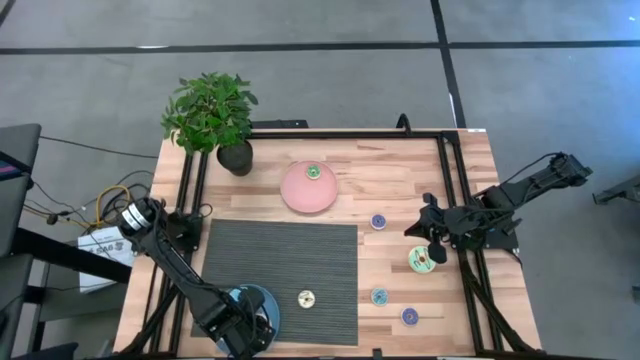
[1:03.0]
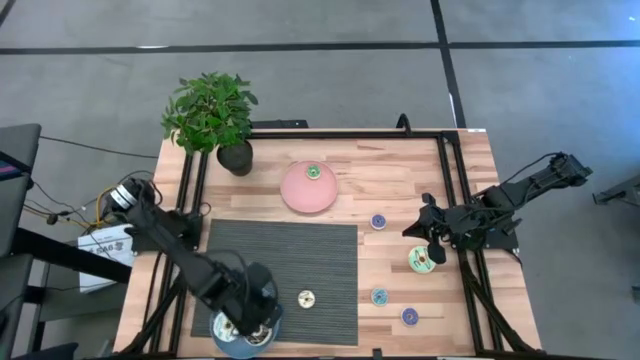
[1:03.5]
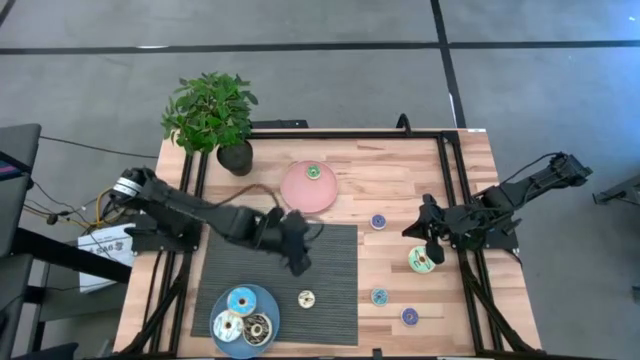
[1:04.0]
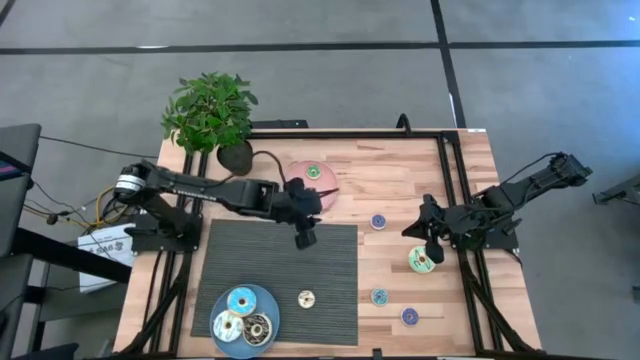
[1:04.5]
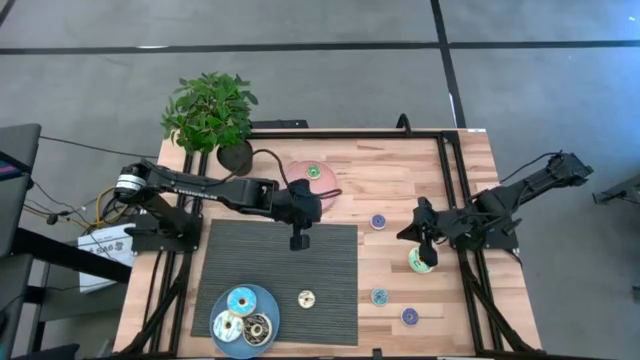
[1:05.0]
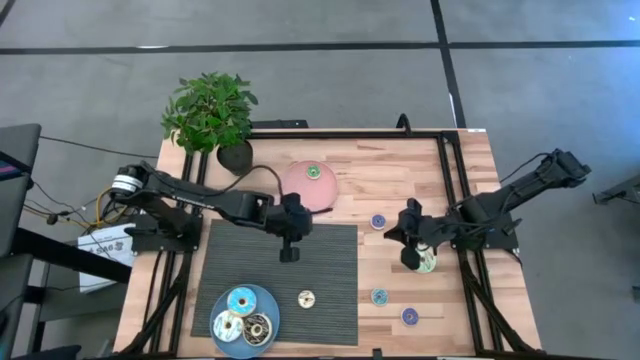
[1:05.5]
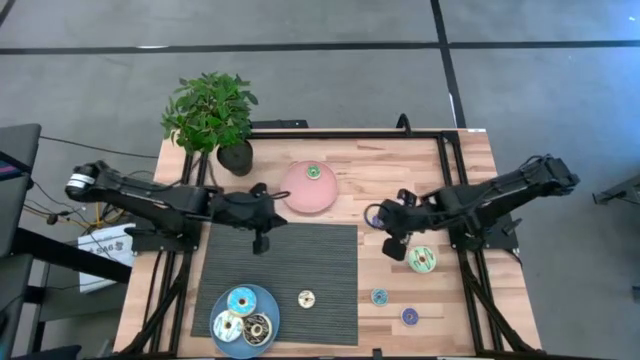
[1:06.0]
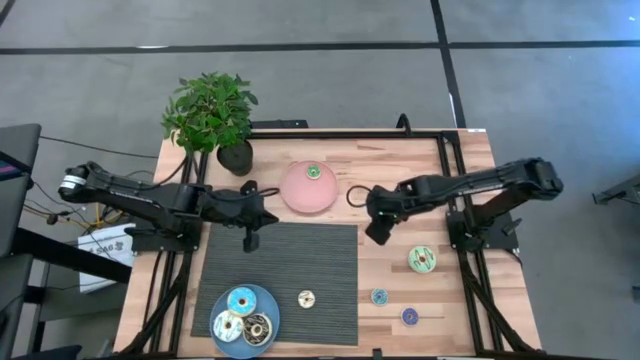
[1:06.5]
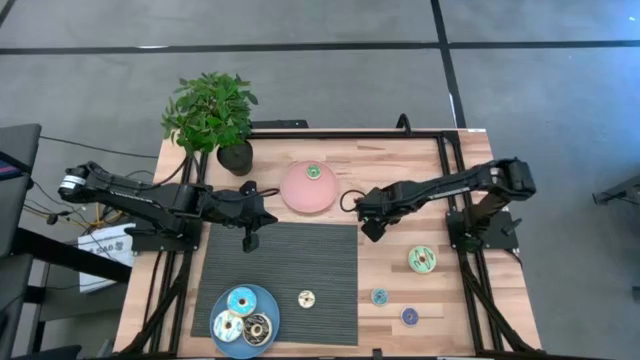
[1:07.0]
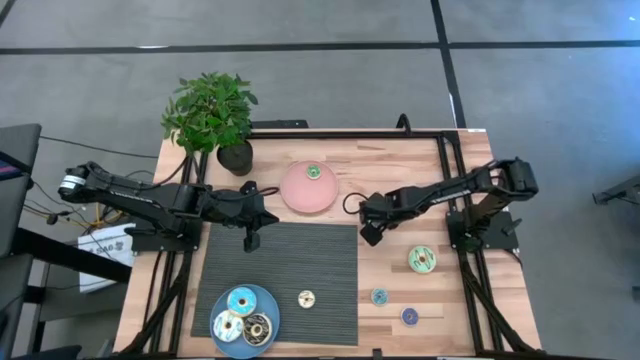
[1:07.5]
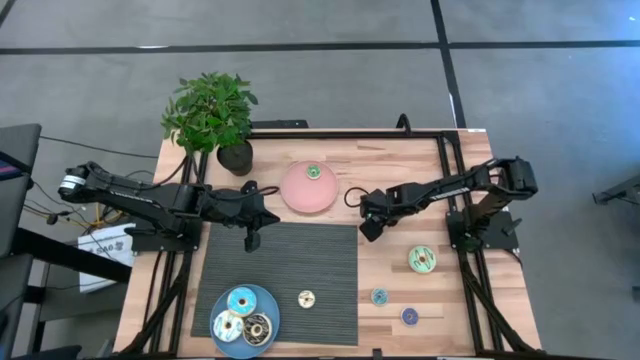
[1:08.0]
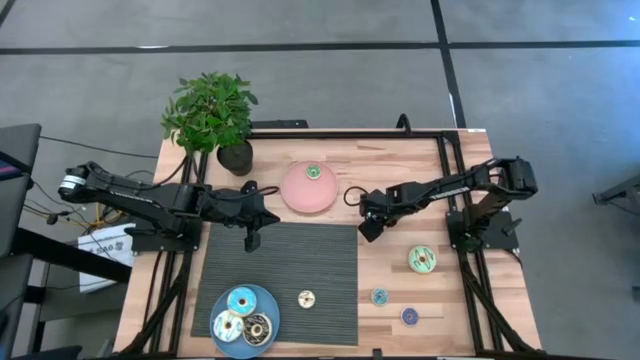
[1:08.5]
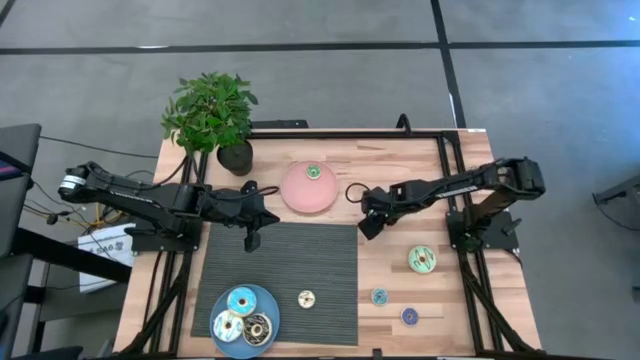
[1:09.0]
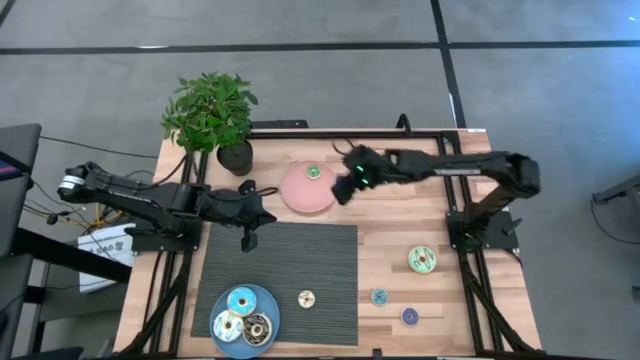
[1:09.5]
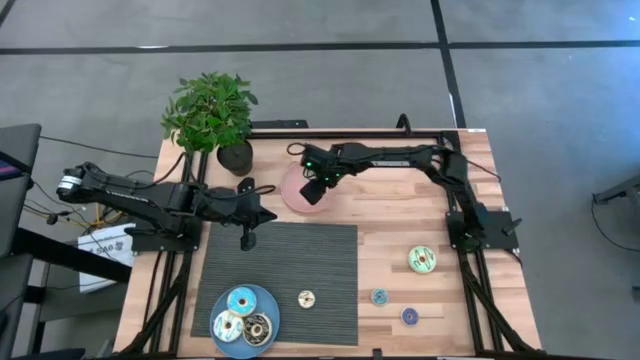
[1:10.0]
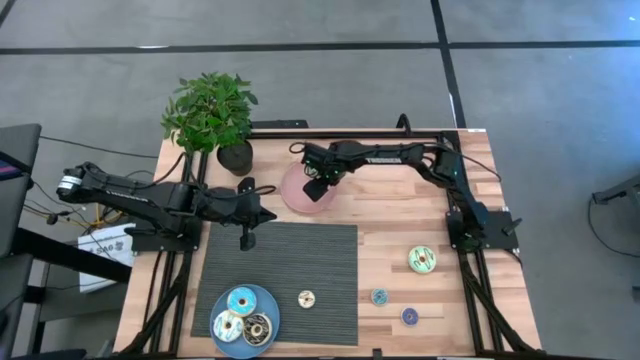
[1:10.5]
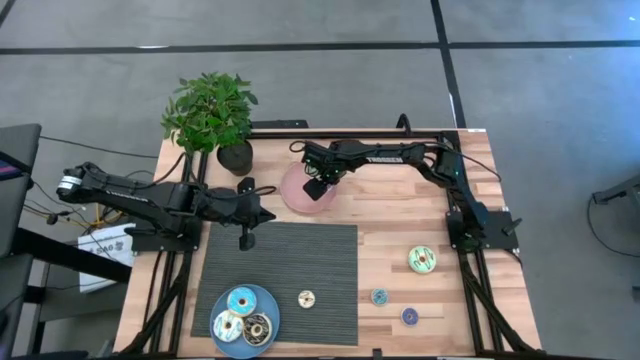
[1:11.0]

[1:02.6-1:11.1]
Task: Pick & Place donuts
Put the top small dark blue donut on the pink plate

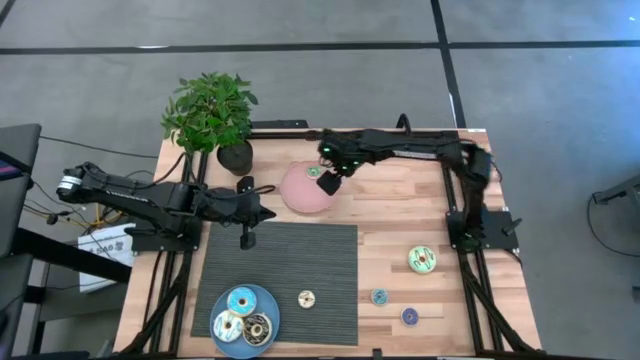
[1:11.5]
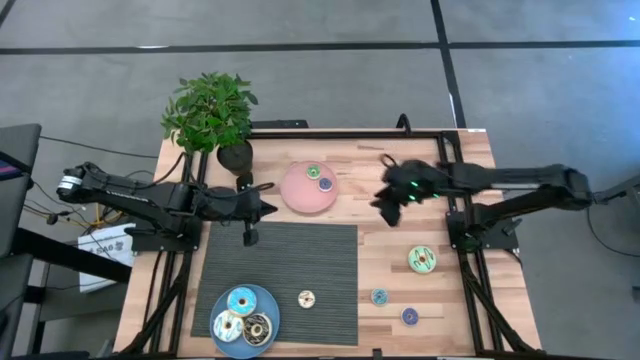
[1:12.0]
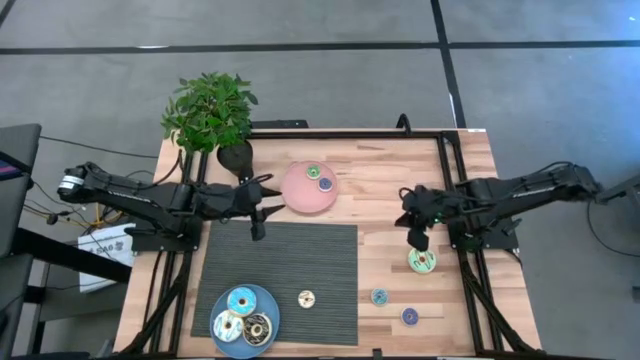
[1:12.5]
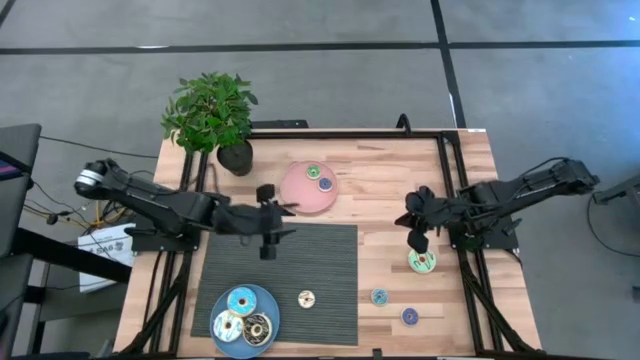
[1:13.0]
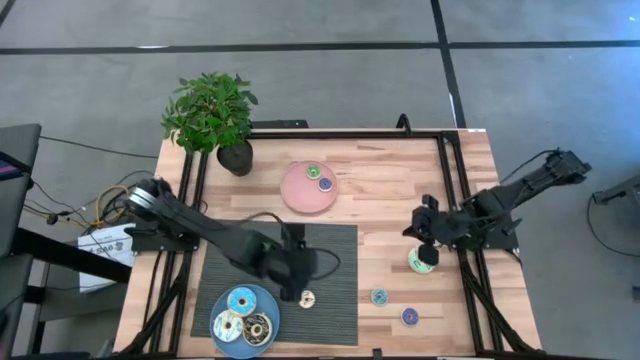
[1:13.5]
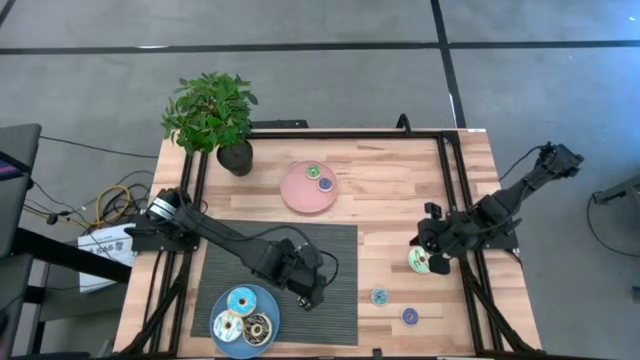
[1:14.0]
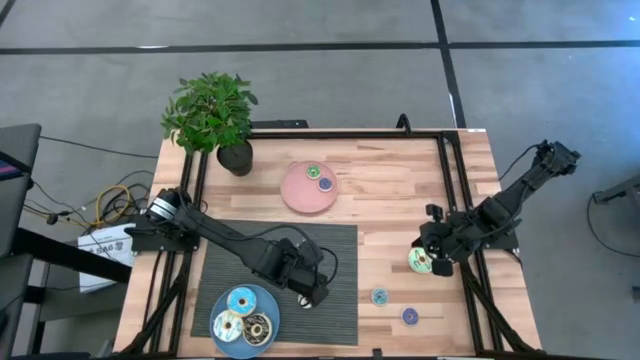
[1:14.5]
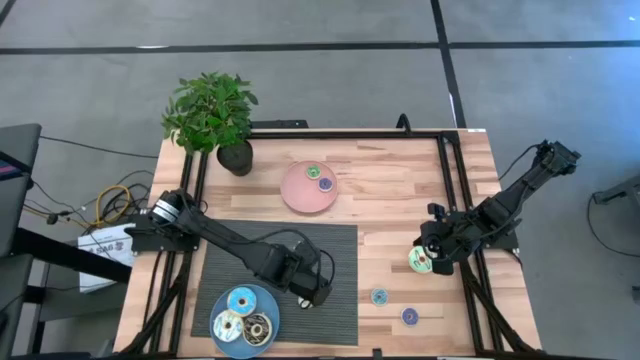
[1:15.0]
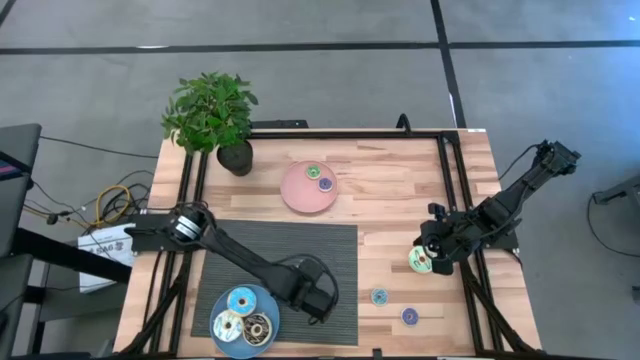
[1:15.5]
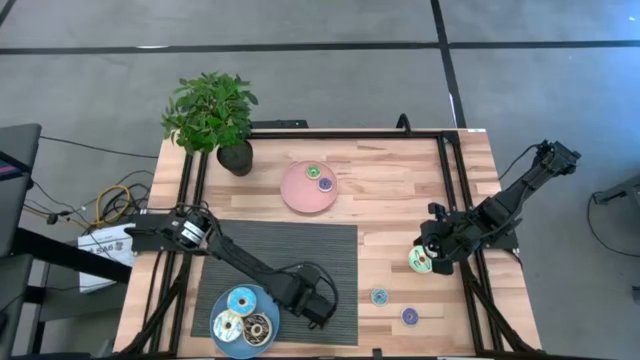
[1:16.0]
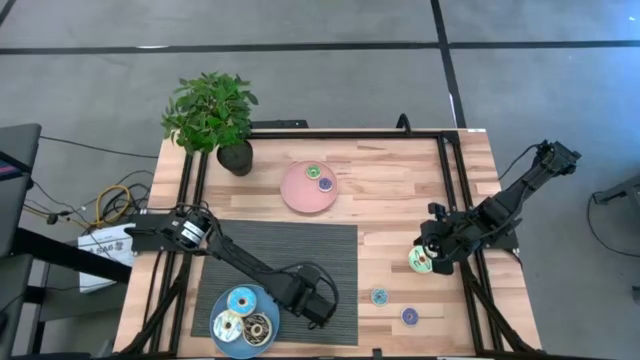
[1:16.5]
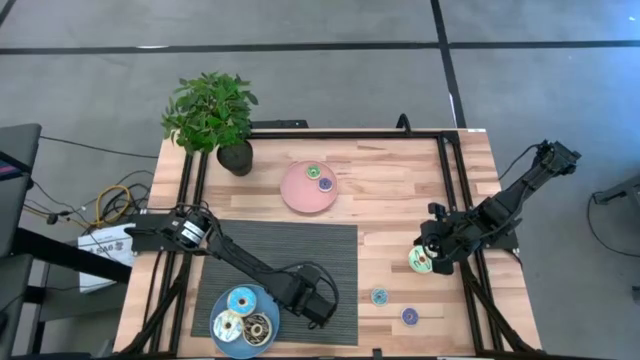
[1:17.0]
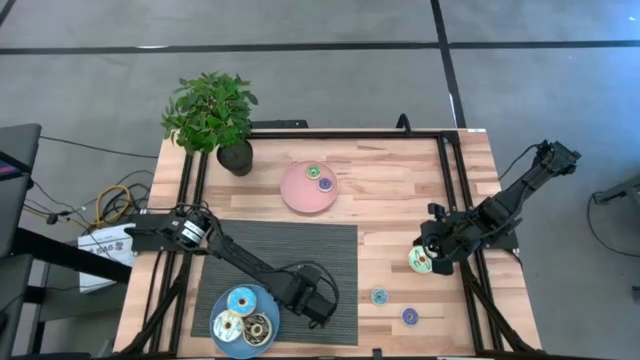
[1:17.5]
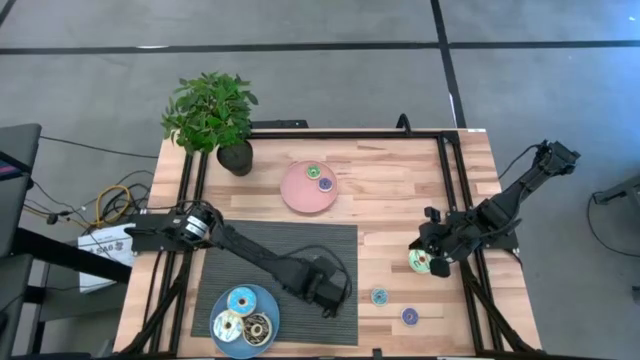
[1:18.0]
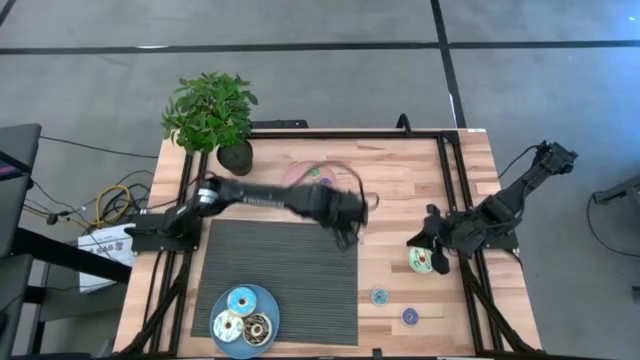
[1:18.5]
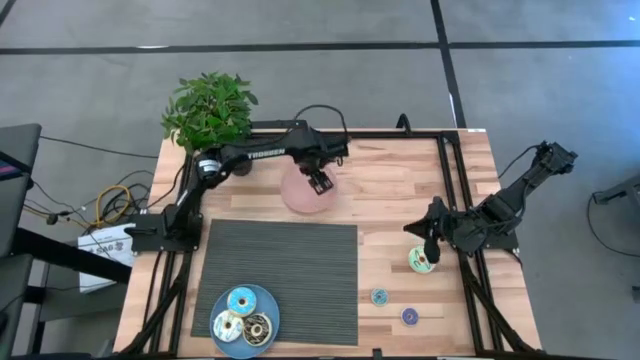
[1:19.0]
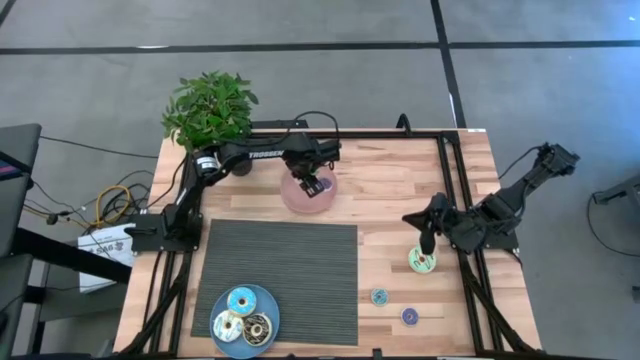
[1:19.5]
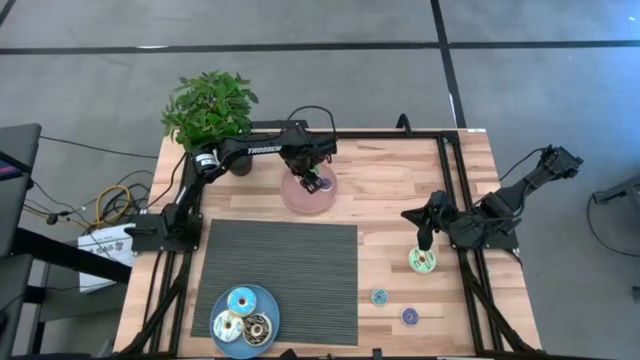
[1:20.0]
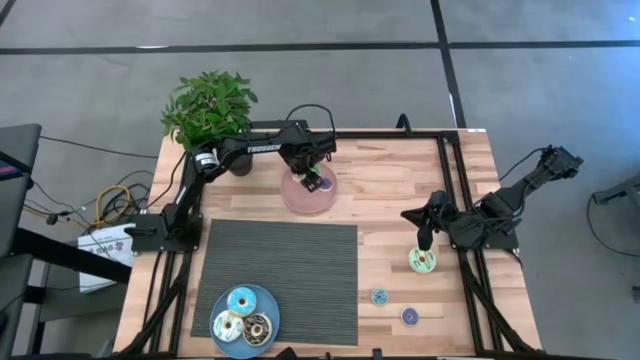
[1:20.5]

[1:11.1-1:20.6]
Put the small white donut on the pink plate
